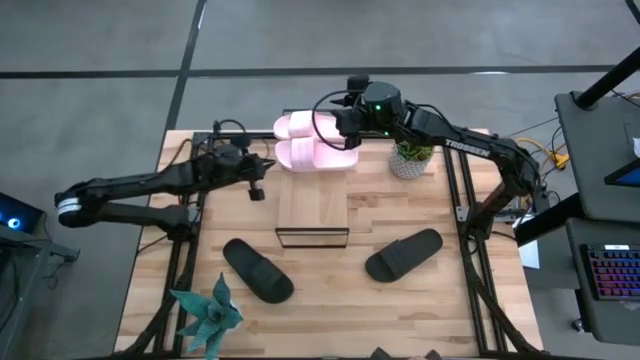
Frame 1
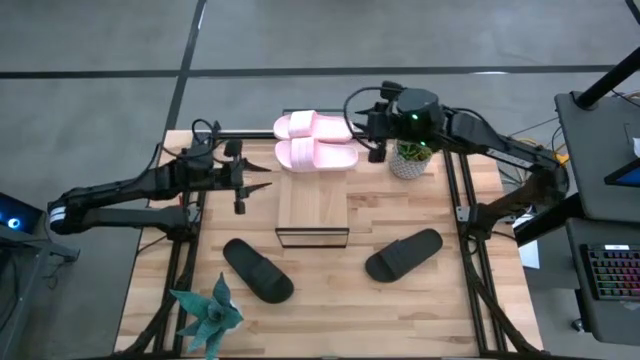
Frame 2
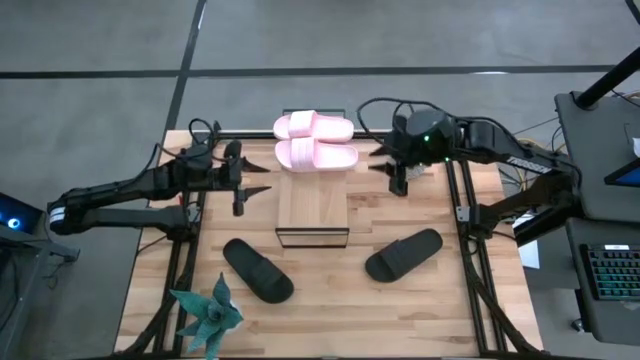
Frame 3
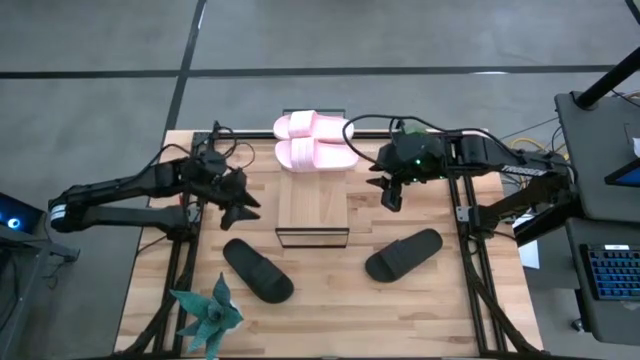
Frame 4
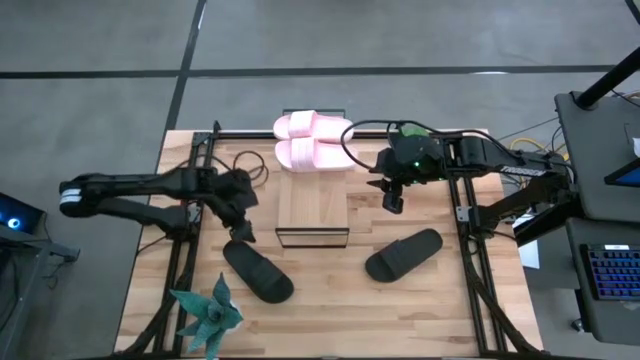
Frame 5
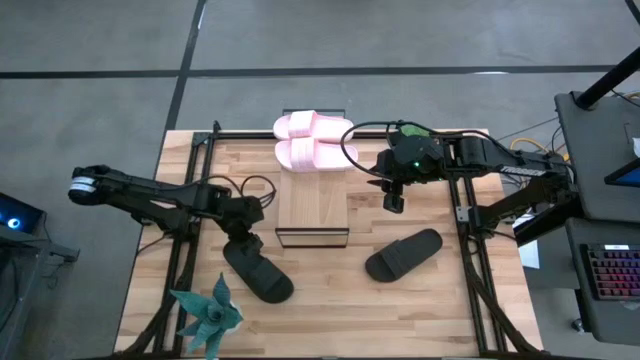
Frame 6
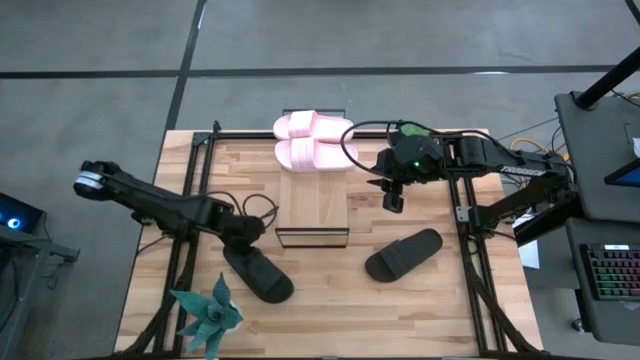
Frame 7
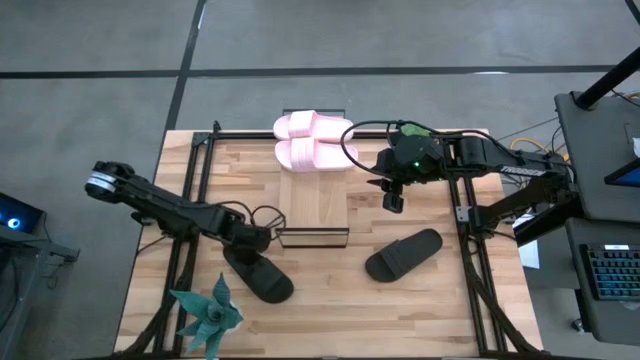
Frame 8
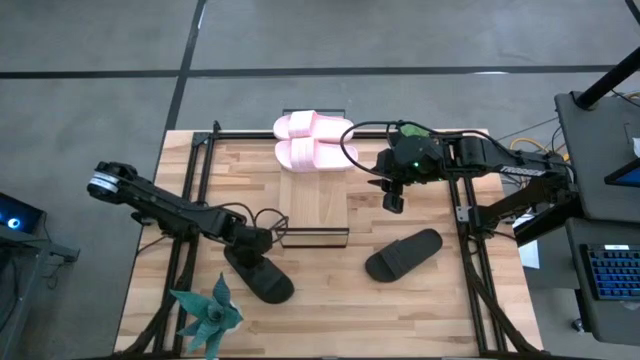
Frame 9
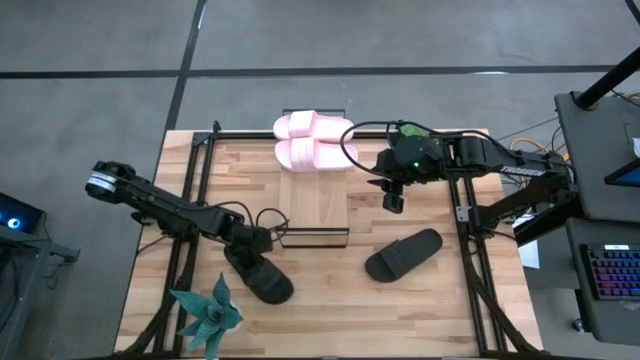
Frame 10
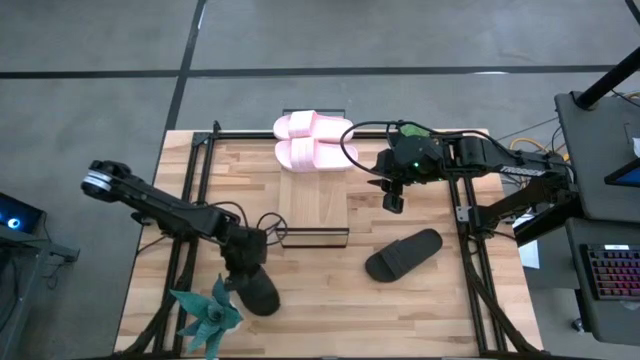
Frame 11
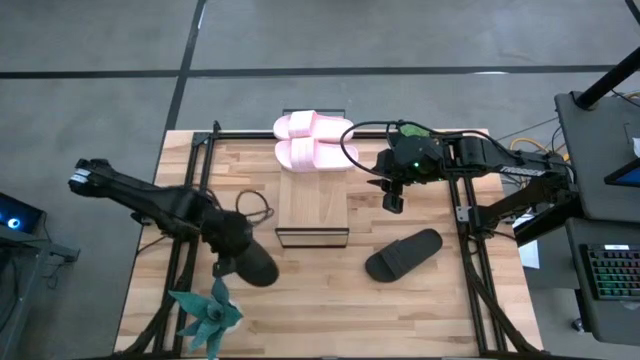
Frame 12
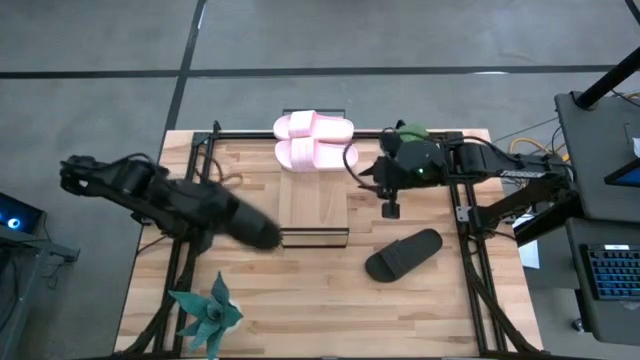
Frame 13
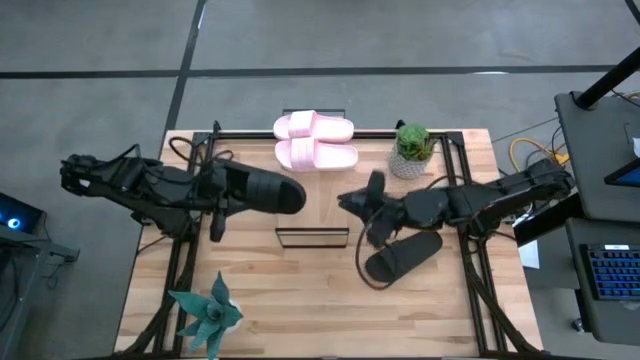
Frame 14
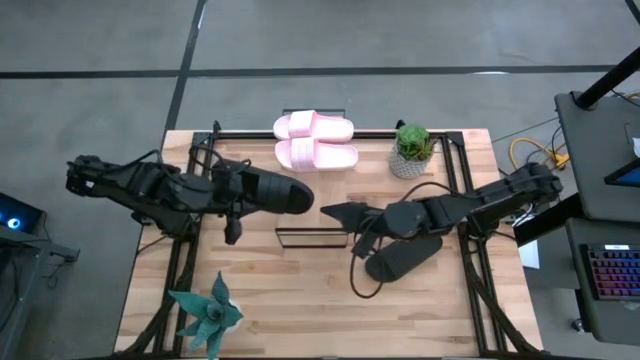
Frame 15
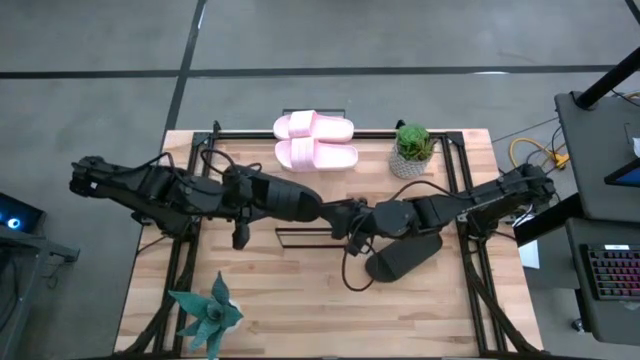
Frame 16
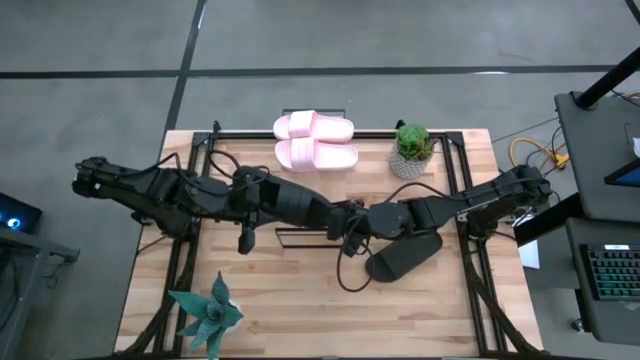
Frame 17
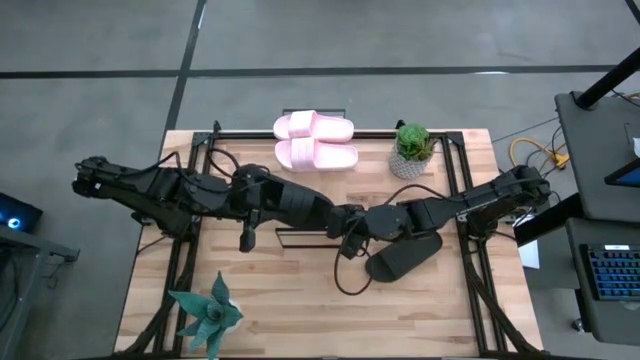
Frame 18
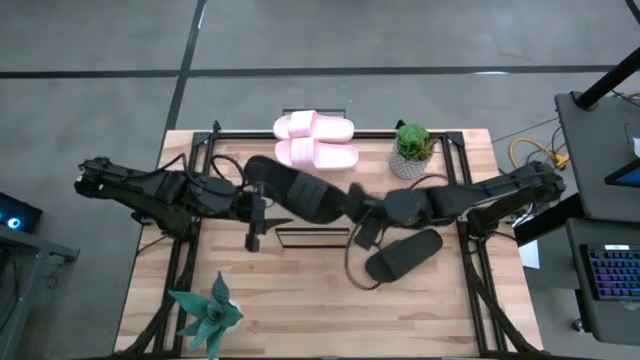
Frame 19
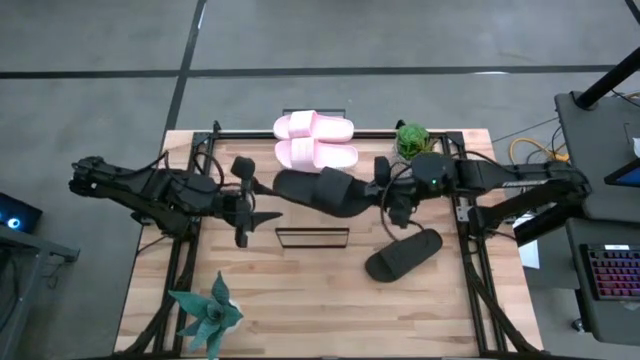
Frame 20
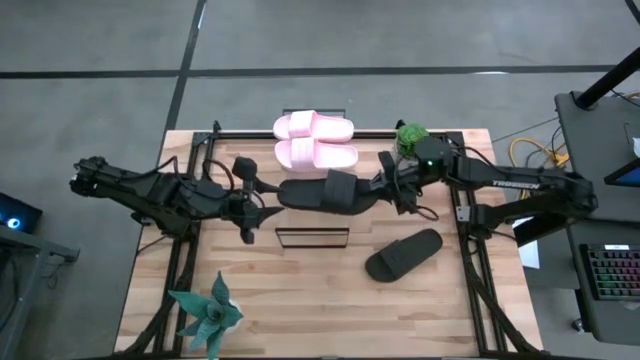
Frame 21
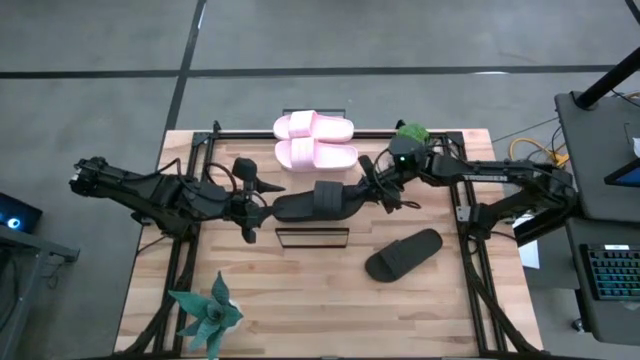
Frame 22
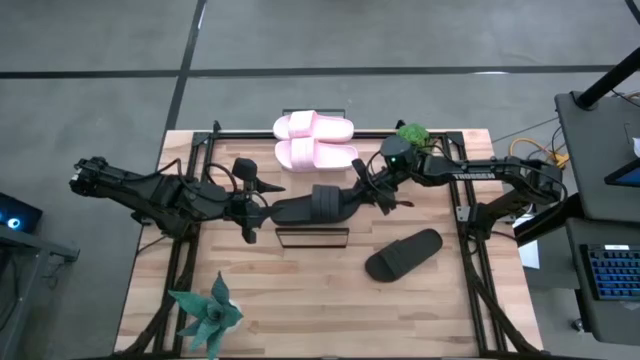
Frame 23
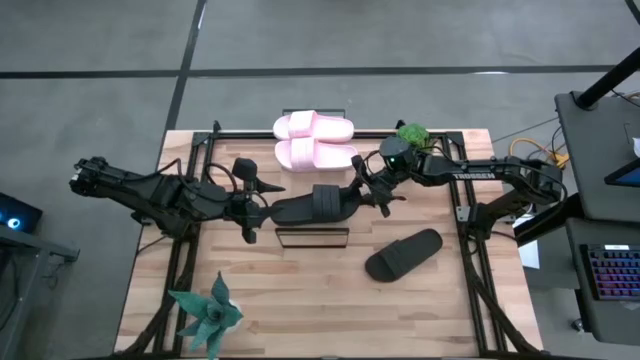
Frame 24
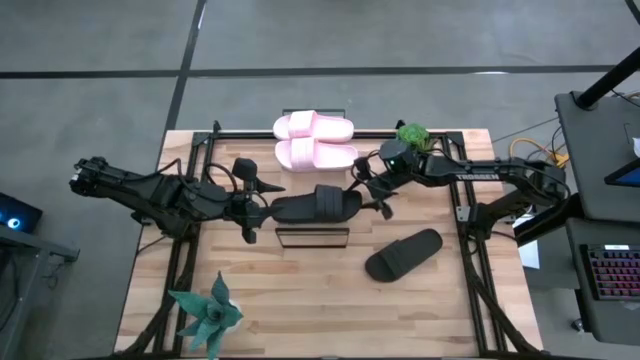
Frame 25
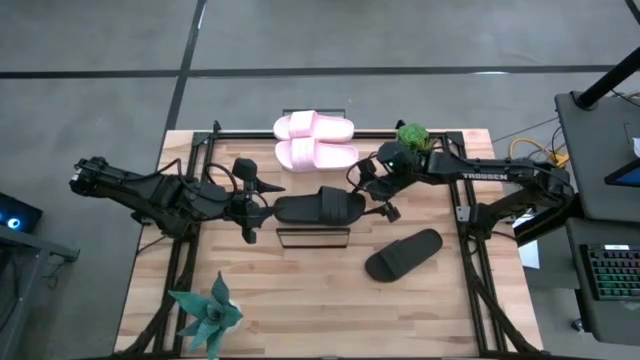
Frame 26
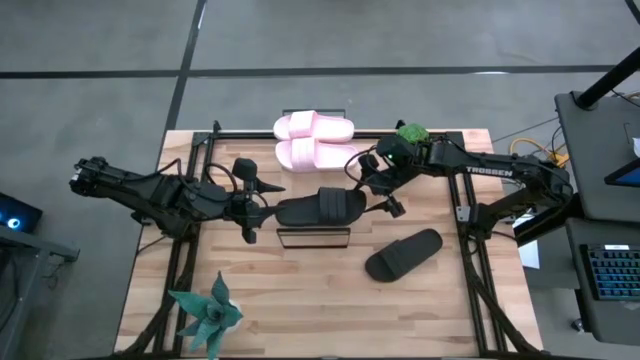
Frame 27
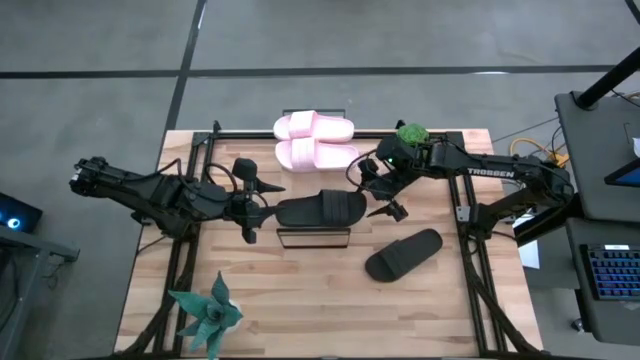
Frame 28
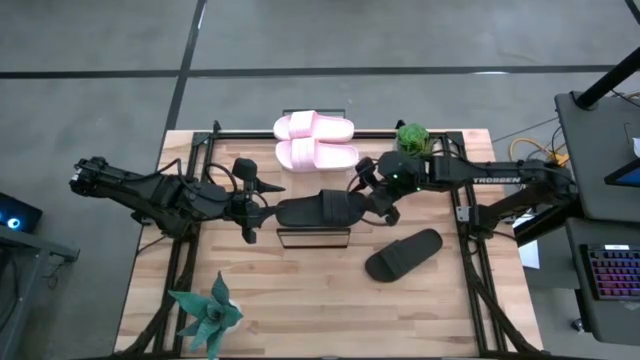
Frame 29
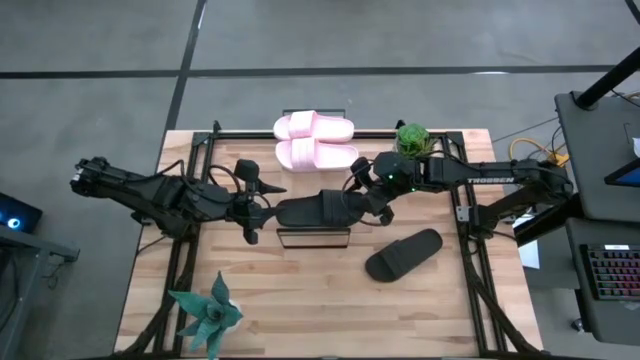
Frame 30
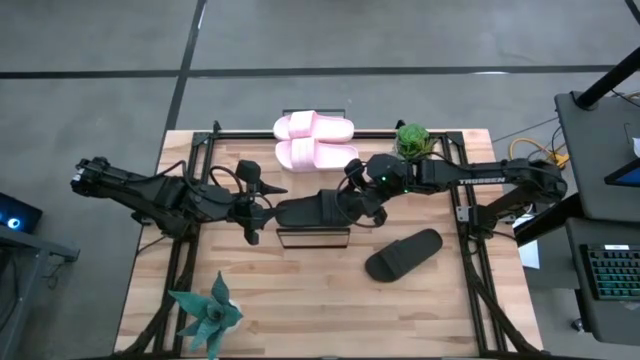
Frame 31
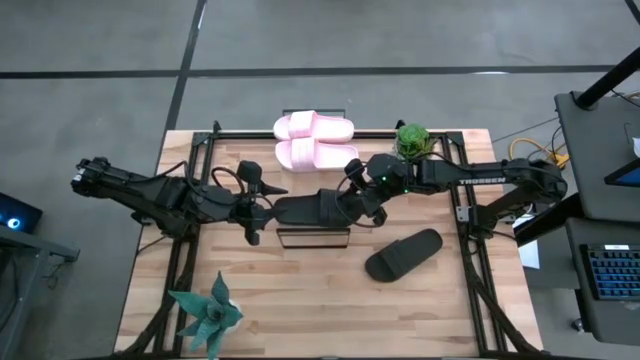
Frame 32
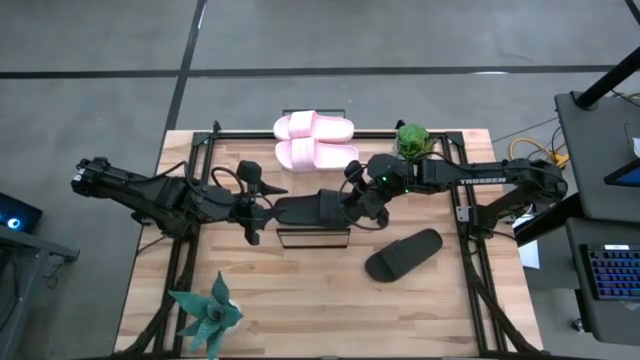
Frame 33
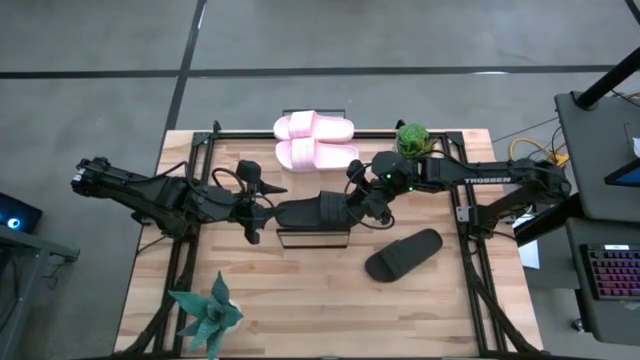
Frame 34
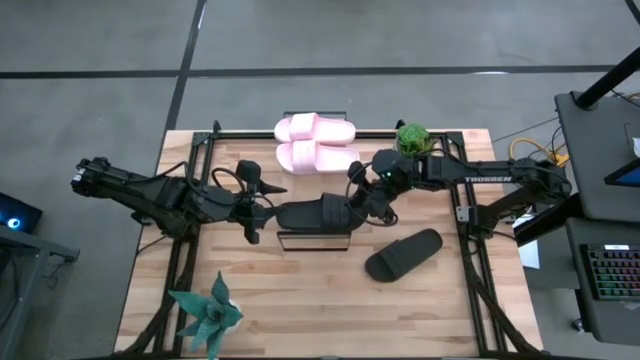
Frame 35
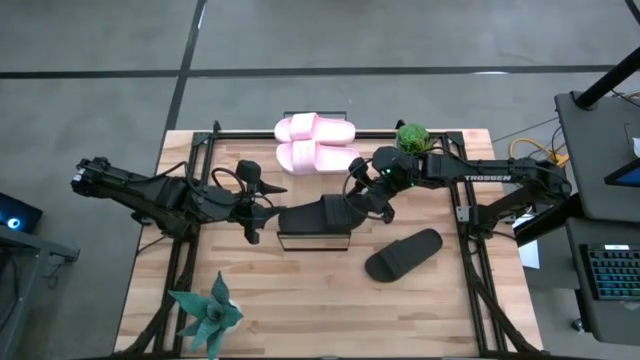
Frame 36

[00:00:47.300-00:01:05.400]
Task: Pick and place slides into the shelf
Put the left black slide on the shelf

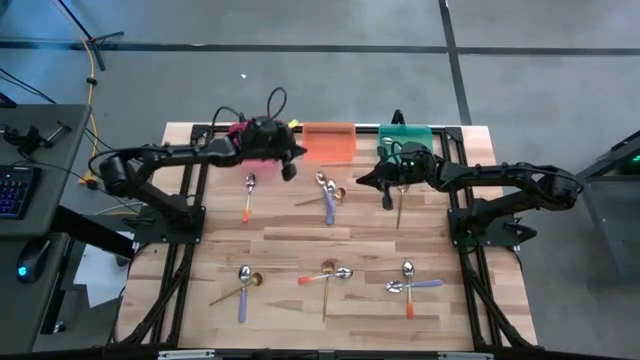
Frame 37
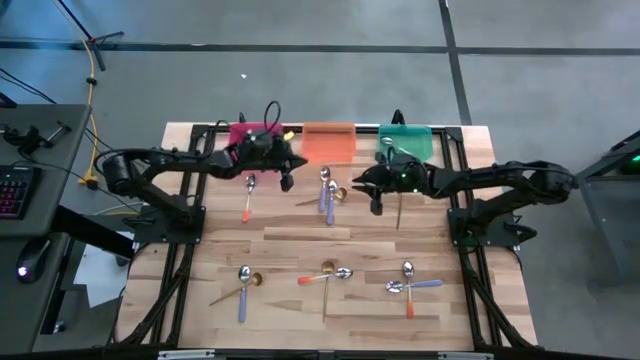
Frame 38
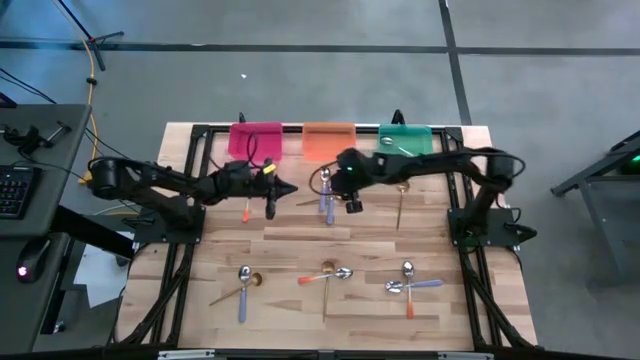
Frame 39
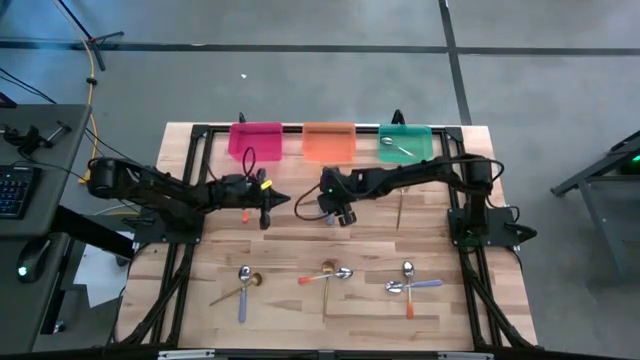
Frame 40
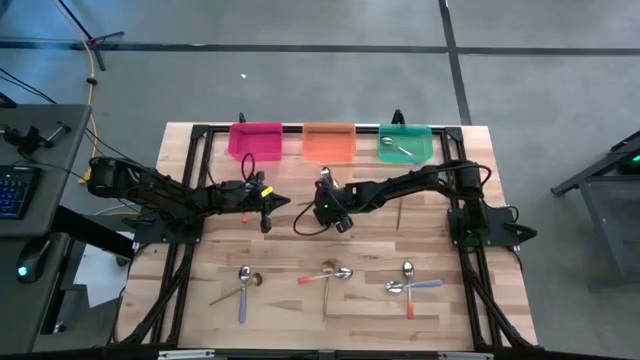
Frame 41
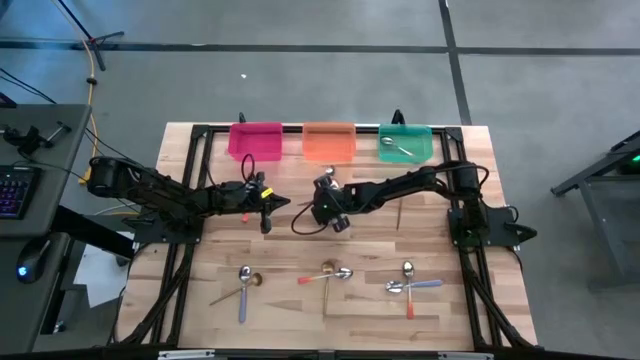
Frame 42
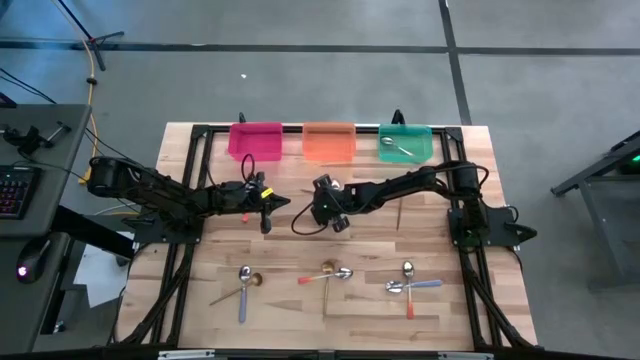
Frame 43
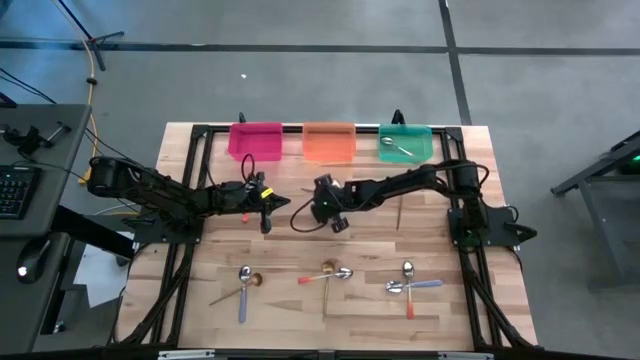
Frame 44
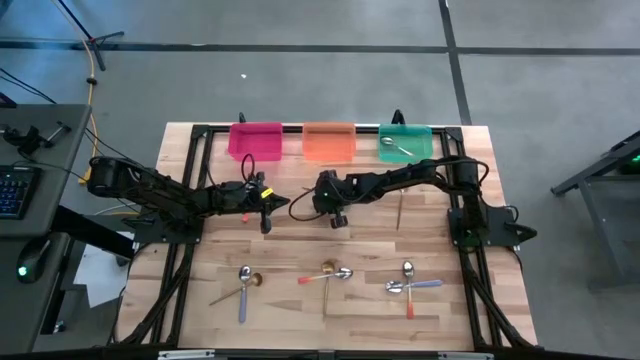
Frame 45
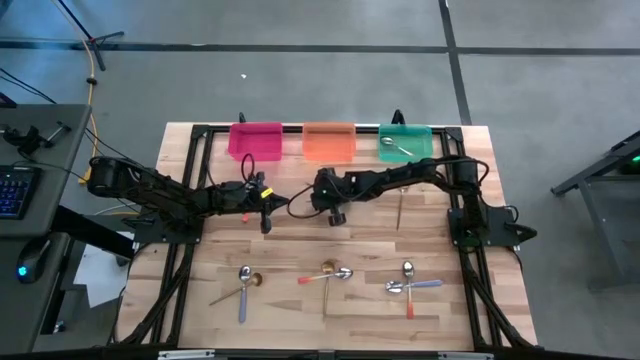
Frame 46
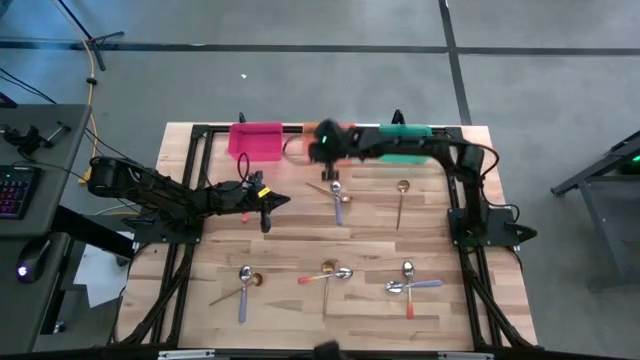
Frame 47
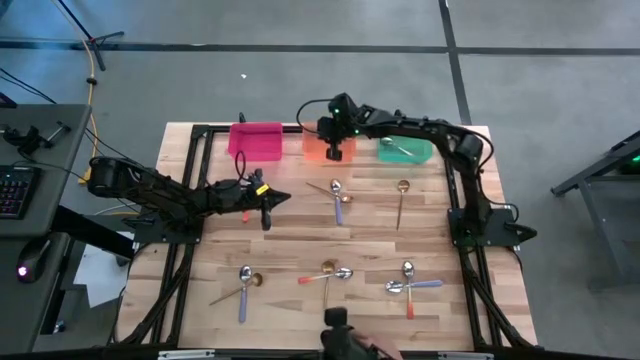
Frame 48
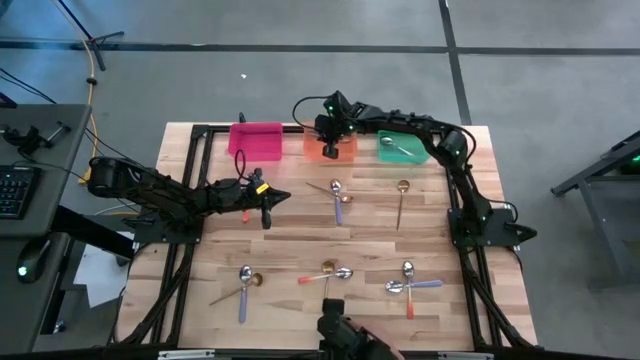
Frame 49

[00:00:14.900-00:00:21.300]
Task: Sort silverware by color (type)
Put the top left light violet spoon into the orange bin
